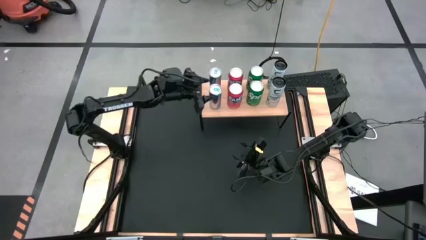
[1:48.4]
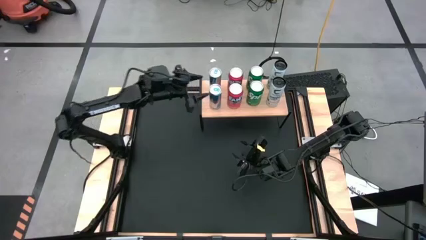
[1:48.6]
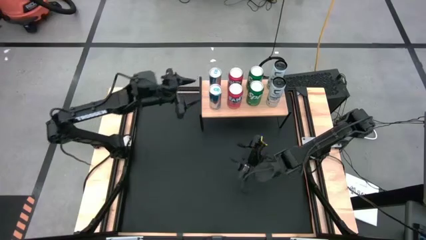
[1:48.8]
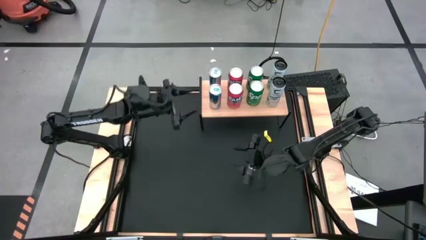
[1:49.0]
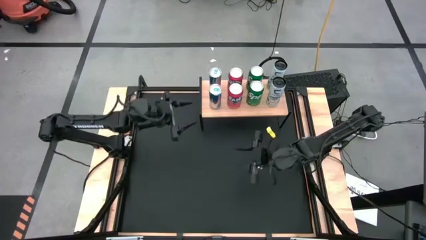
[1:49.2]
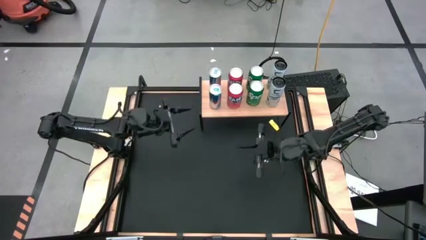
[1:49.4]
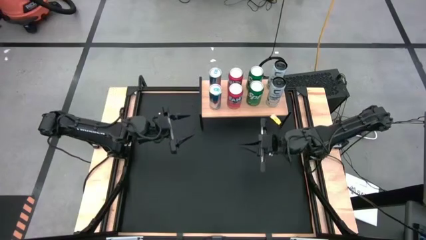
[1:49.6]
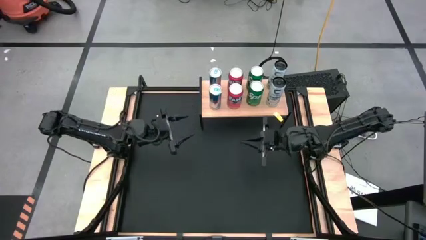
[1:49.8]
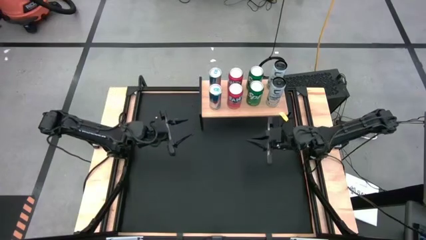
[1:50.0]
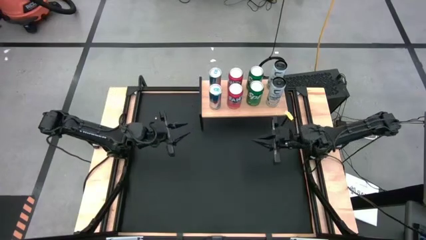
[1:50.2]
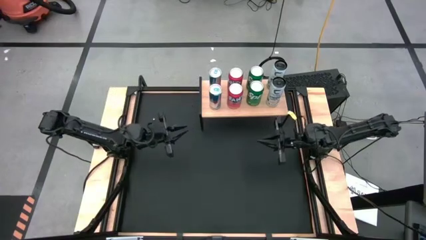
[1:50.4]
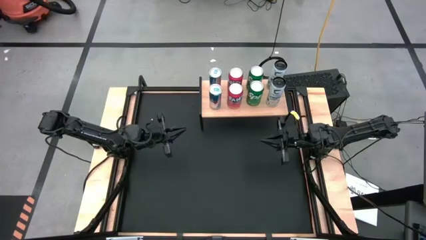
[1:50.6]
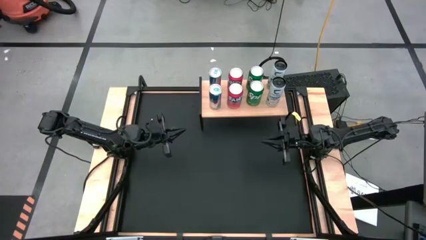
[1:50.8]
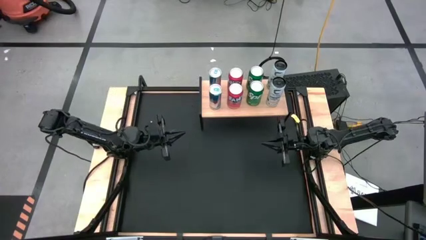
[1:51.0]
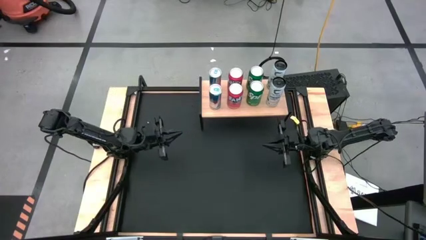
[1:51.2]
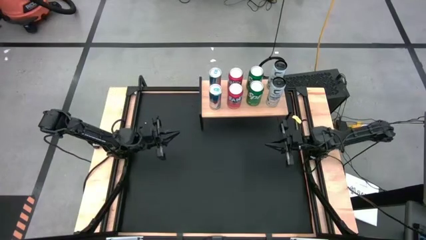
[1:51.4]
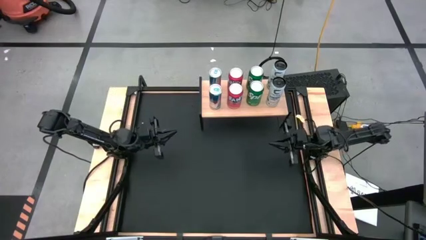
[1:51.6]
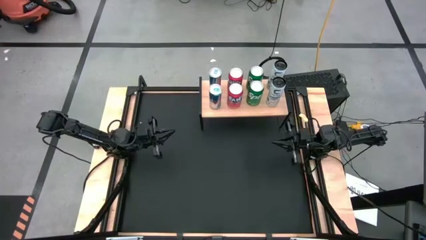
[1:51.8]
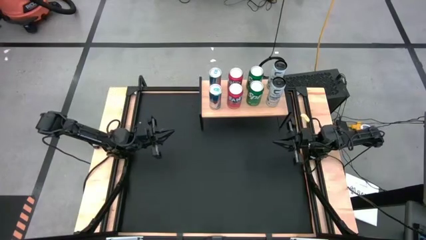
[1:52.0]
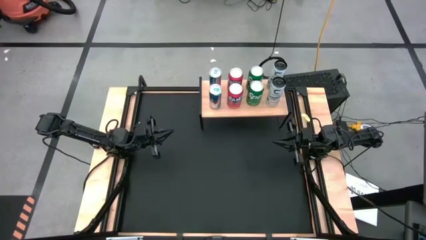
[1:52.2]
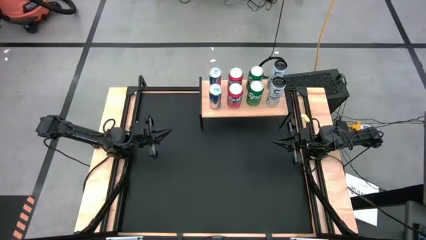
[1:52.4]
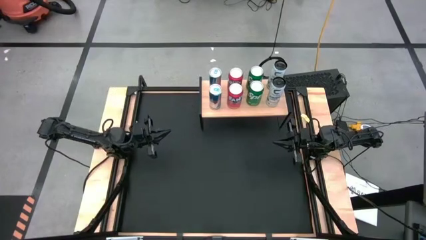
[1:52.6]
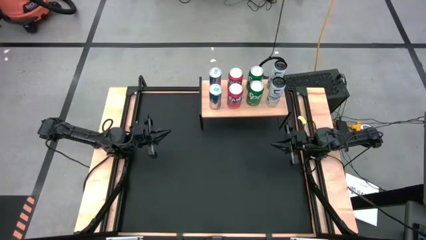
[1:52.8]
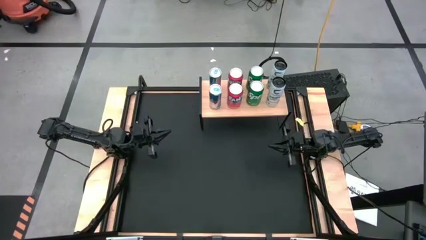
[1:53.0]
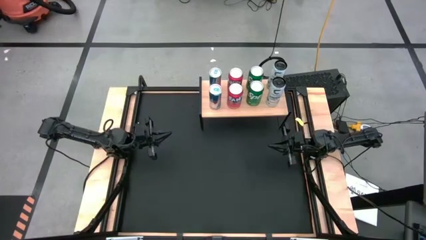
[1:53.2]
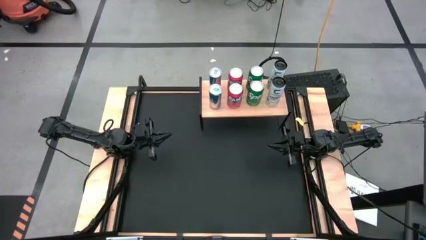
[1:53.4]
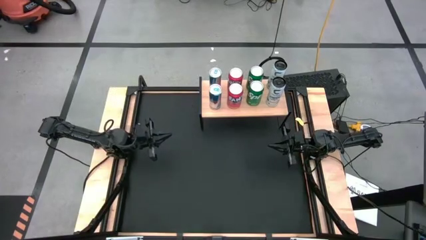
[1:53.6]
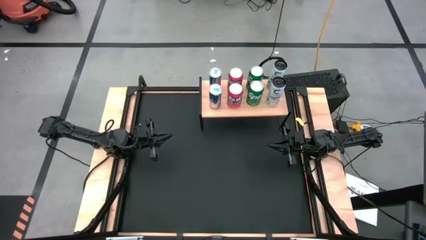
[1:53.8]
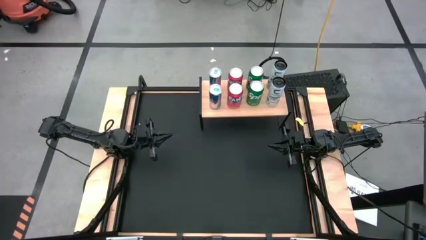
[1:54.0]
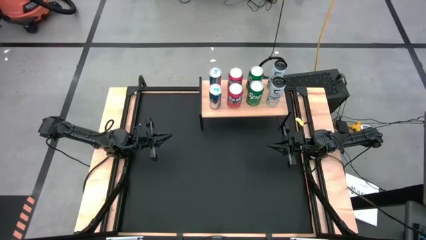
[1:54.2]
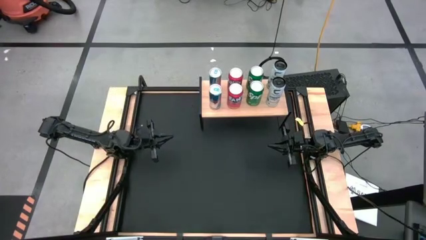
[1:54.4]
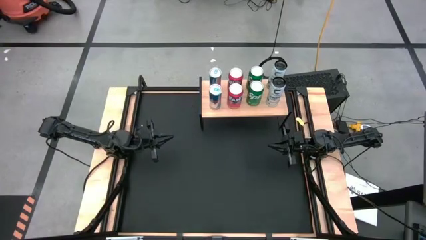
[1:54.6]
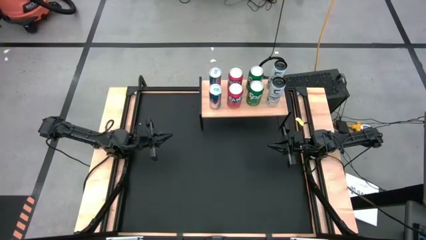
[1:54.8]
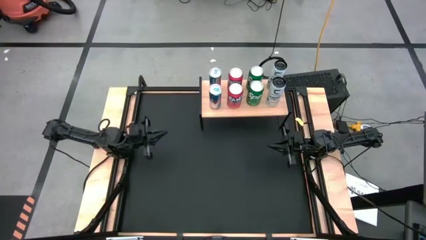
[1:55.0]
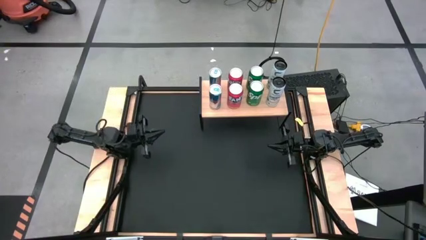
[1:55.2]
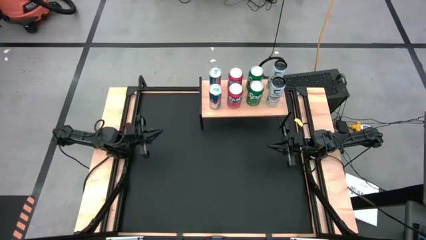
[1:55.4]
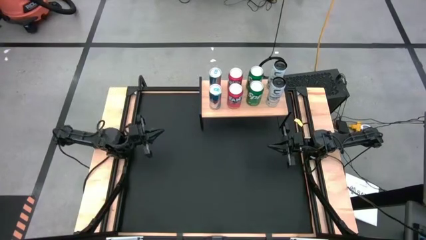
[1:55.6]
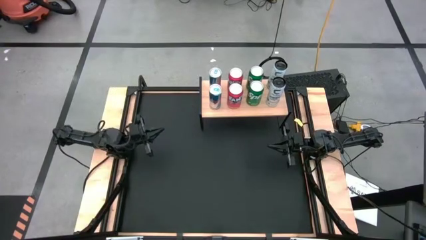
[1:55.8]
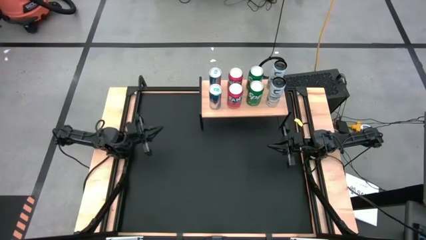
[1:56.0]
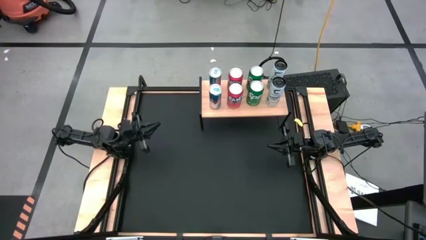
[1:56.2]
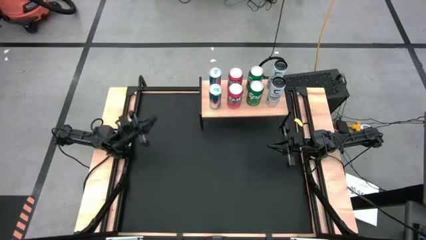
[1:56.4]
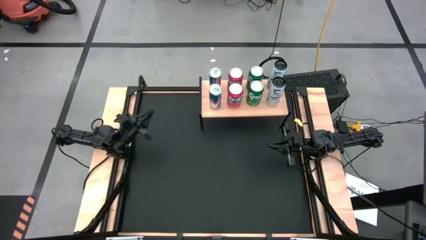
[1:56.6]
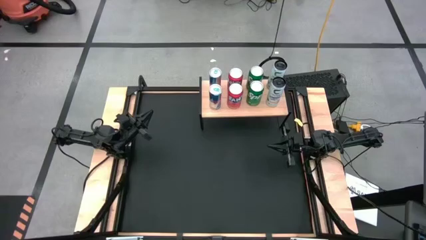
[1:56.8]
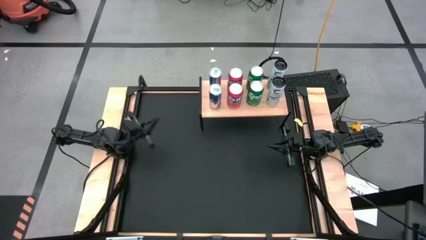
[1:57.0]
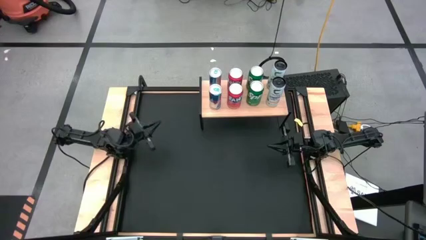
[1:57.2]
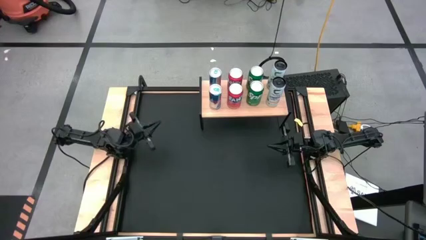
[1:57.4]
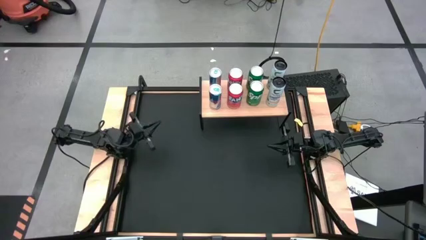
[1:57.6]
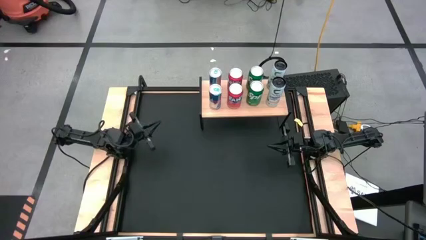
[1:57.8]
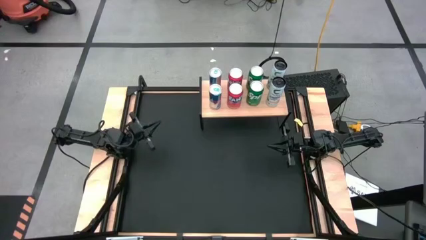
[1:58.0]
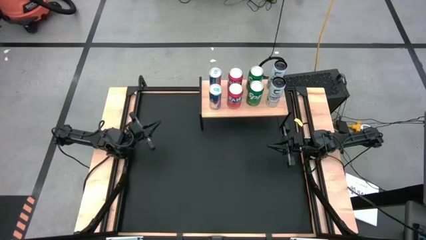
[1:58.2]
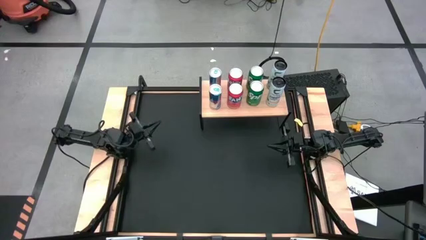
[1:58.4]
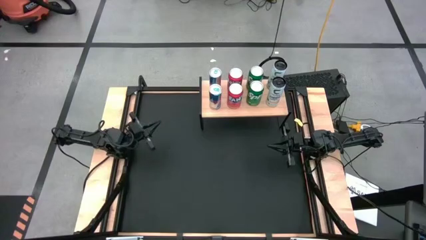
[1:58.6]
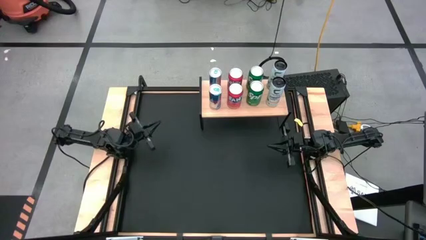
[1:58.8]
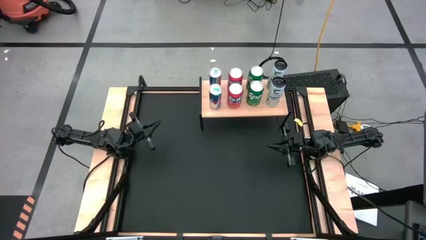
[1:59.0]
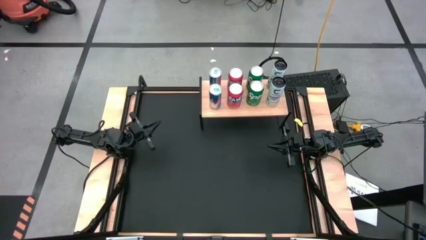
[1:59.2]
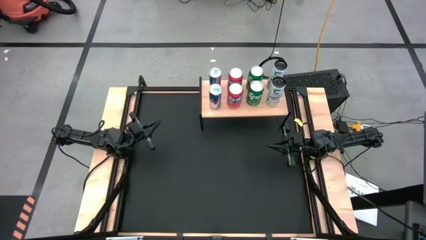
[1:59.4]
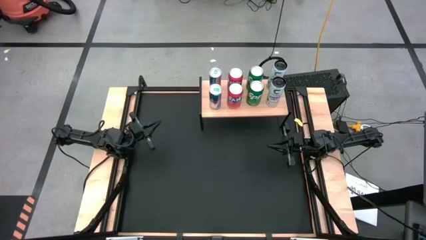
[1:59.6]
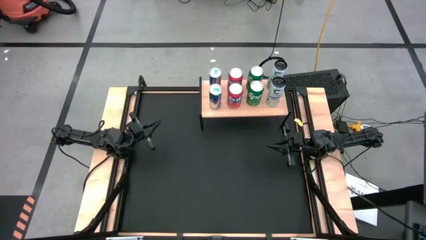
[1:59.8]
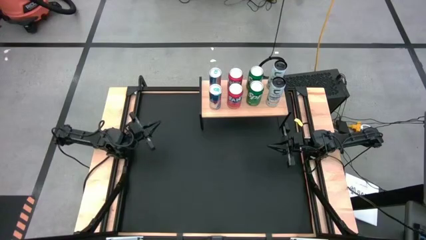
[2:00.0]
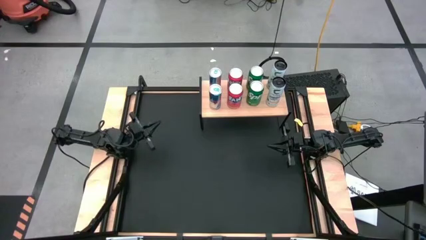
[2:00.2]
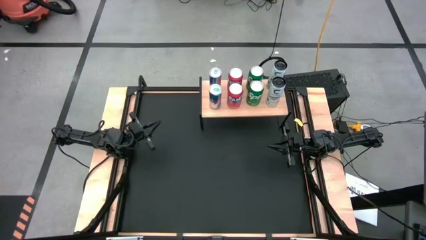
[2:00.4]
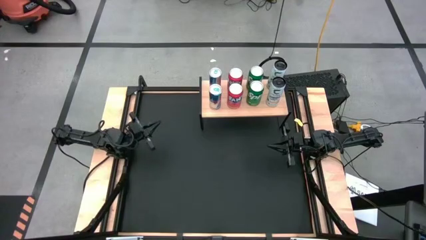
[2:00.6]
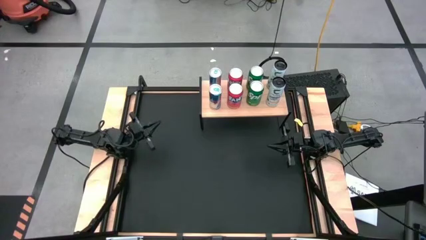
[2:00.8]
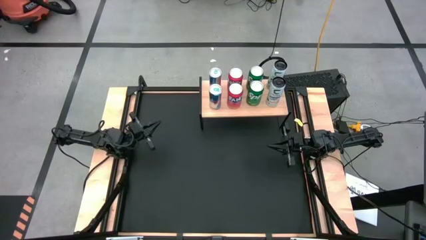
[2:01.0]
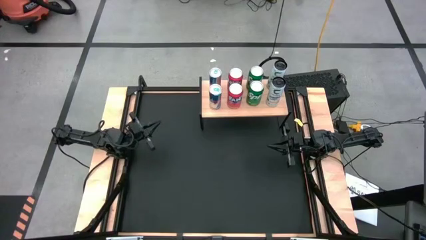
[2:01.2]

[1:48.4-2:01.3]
Task: Place canned beverage on shelf
Return to Home Position

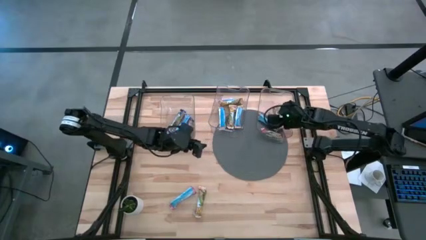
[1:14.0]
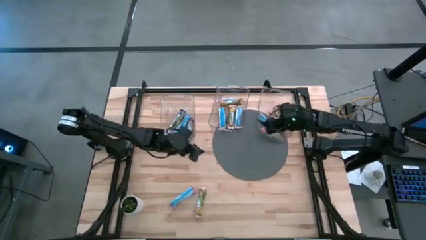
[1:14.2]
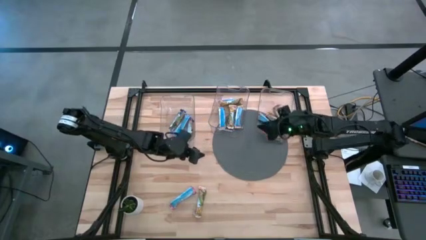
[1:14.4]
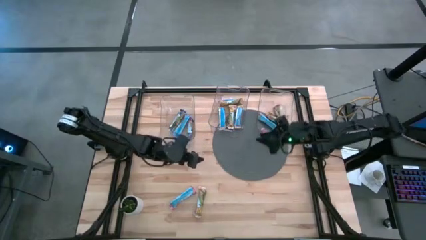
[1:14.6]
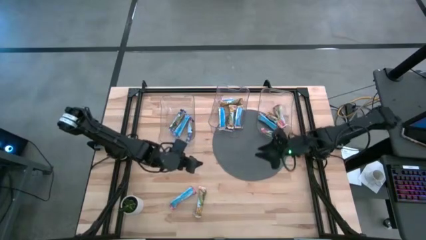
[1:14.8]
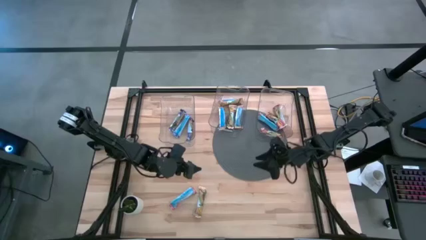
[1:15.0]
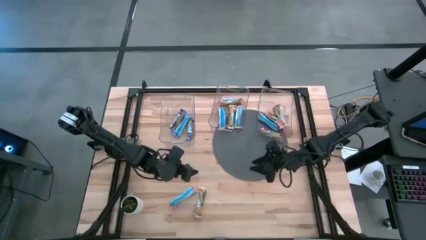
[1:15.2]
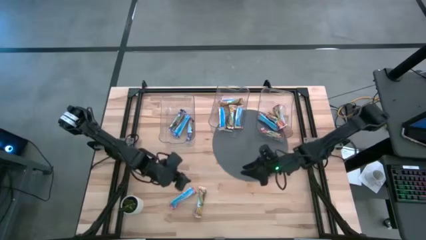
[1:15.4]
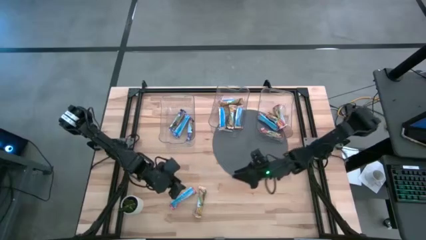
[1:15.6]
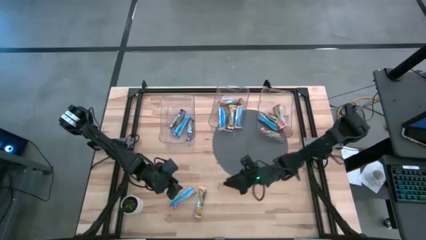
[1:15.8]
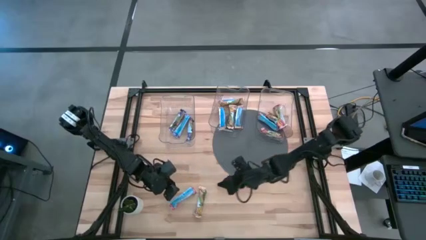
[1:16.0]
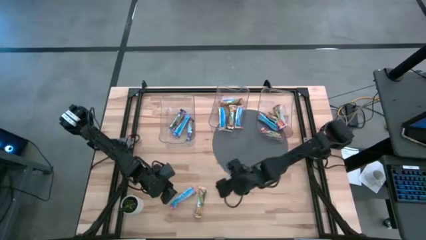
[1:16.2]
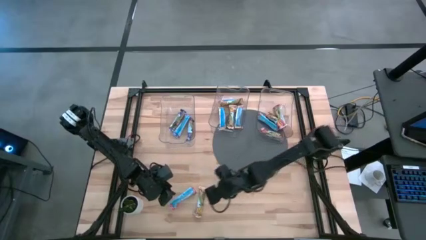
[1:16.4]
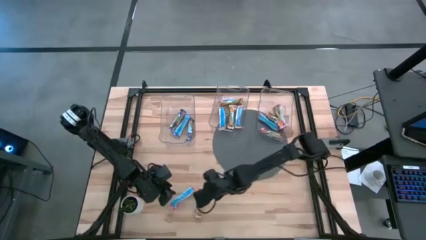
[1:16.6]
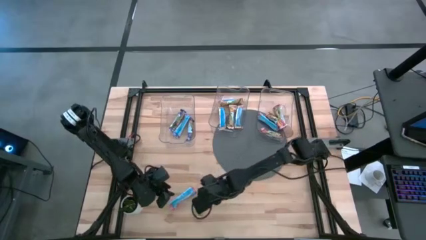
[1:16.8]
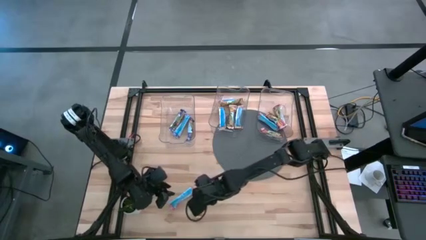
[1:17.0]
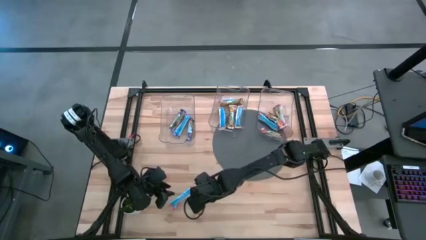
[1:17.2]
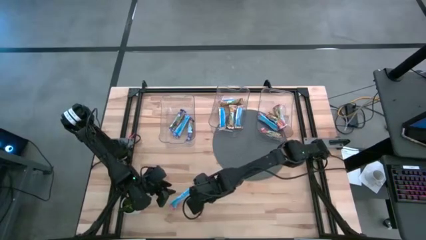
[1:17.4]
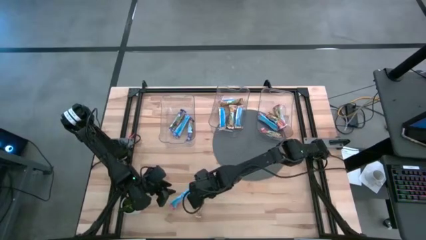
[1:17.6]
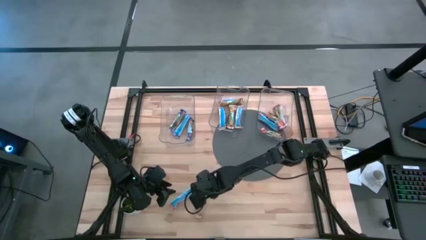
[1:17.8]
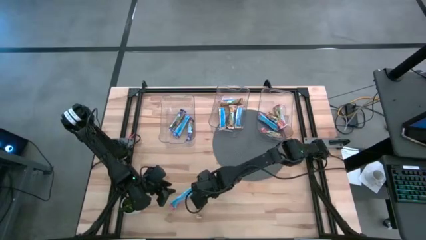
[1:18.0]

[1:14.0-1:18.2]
Task: Pick and place Granola Bars by type
Put the yellow granola bar into the middle transparent bin
